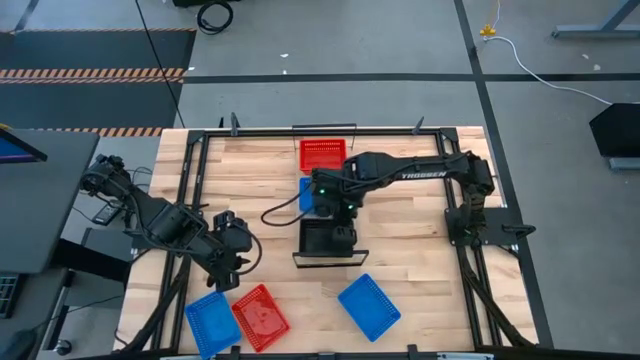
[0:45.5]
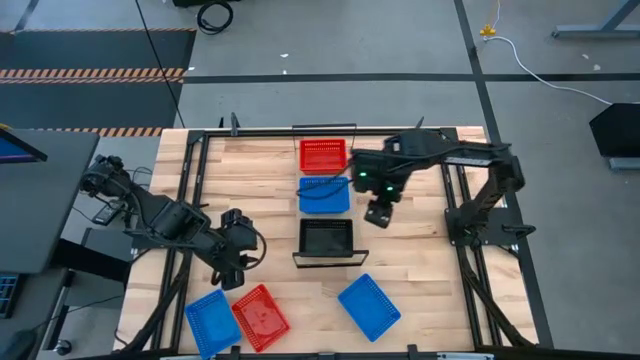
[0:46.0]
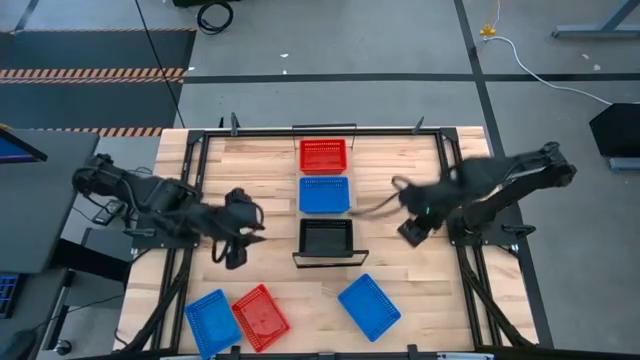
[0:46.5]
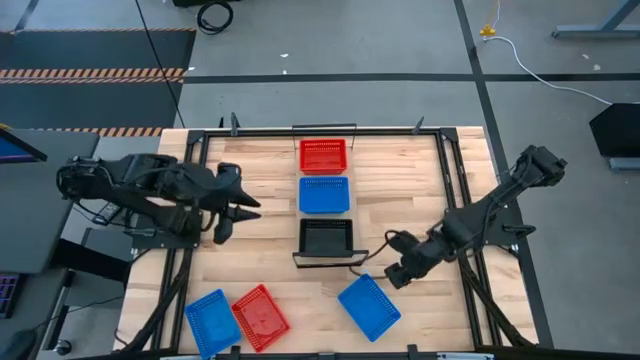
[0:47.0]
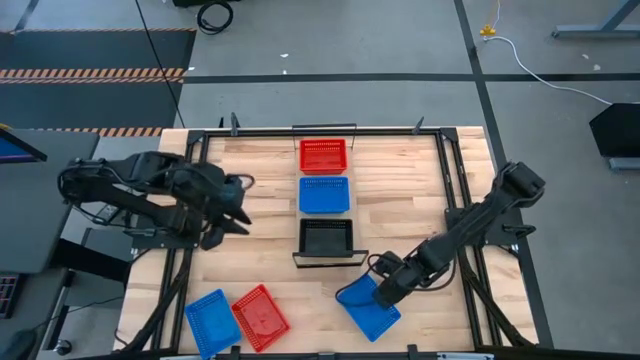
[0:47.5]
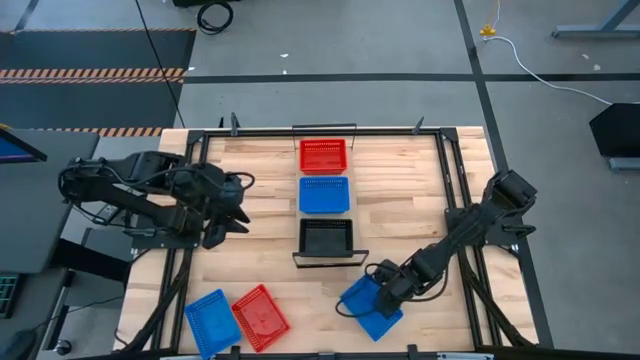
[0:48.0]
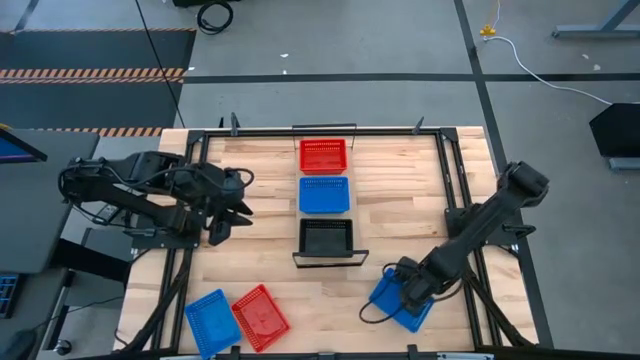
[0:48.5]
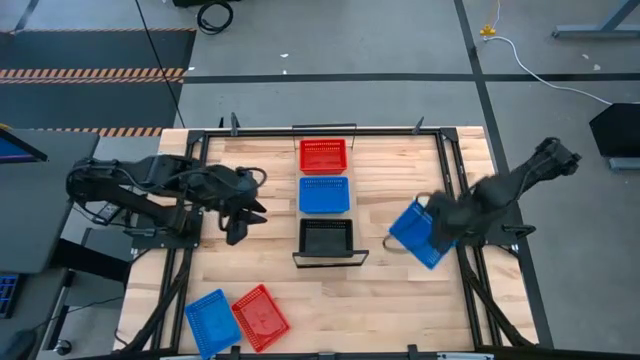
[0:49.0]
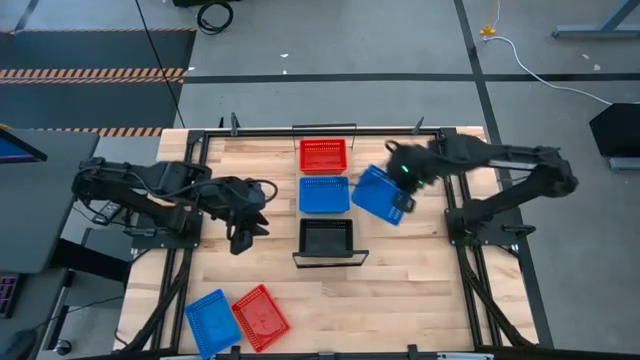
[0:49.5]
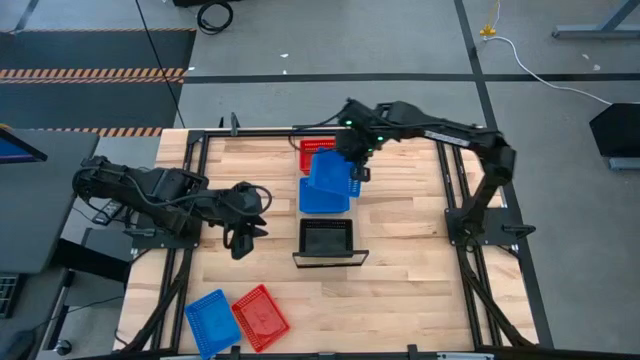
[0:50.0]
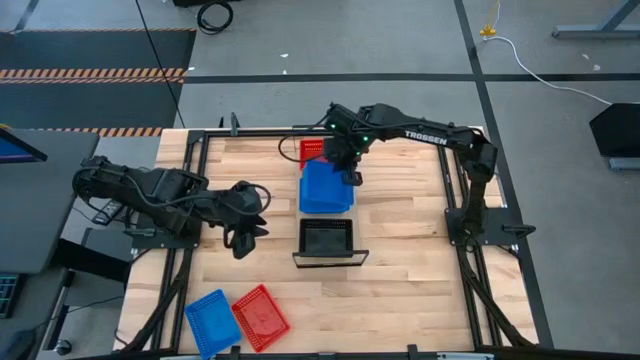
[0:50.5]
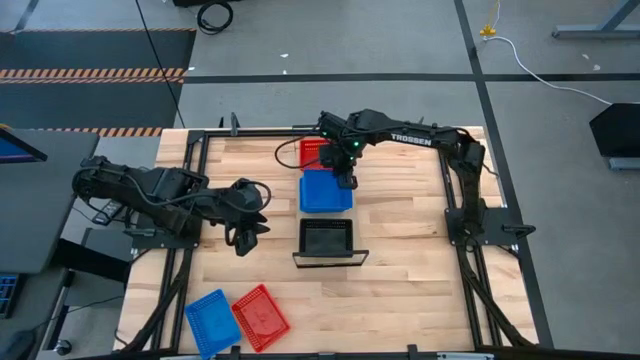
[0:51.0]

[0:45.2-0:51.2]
Task: Stack baskets on shelf by color
Stack the right blue bin on the blue bin on the shelf

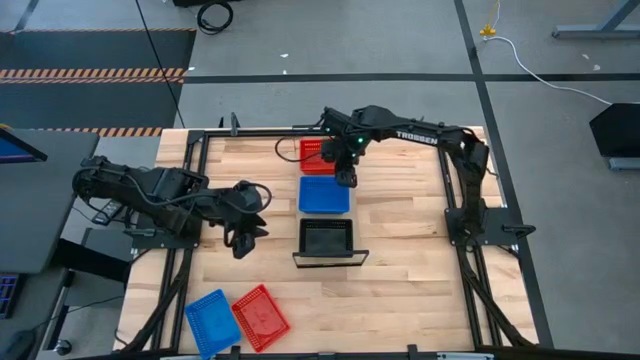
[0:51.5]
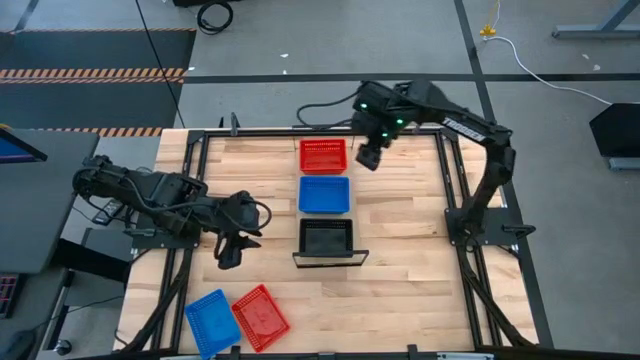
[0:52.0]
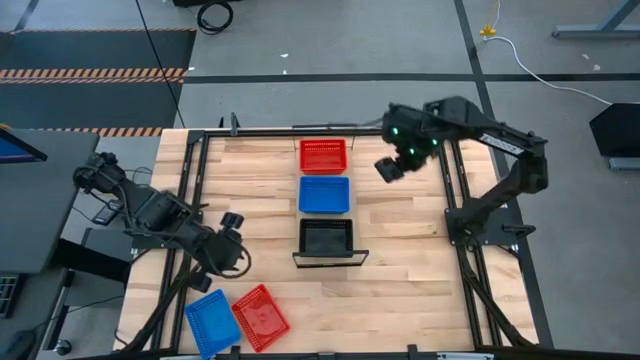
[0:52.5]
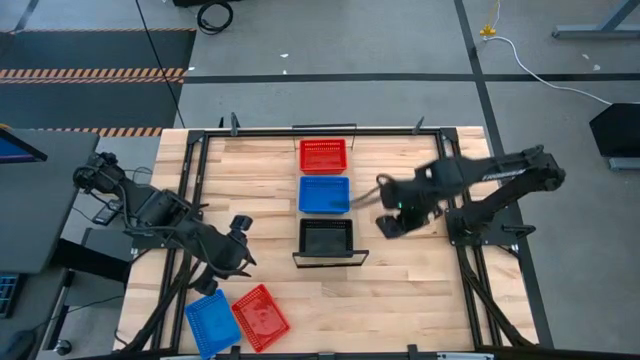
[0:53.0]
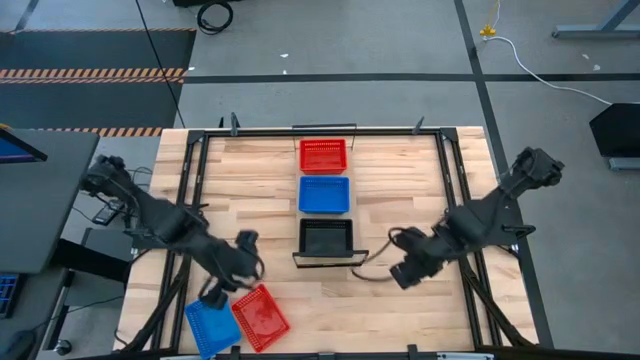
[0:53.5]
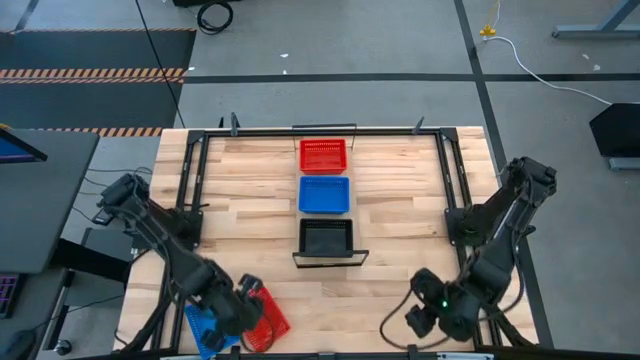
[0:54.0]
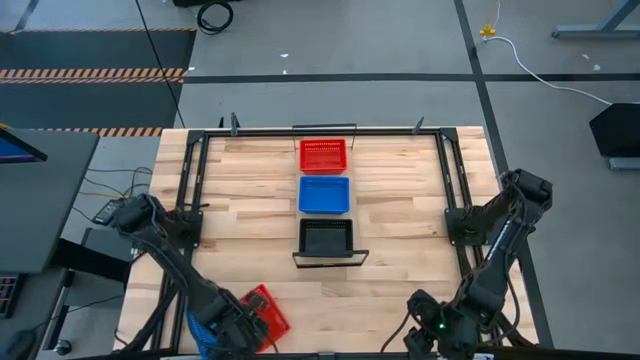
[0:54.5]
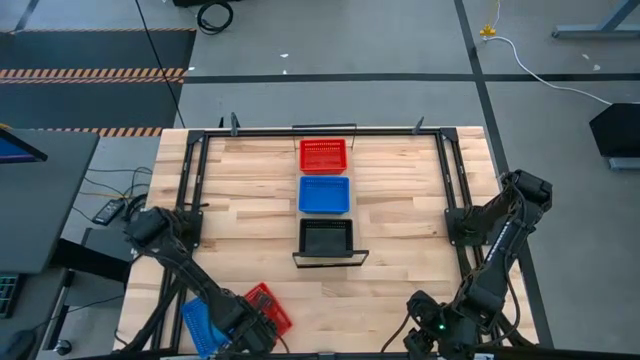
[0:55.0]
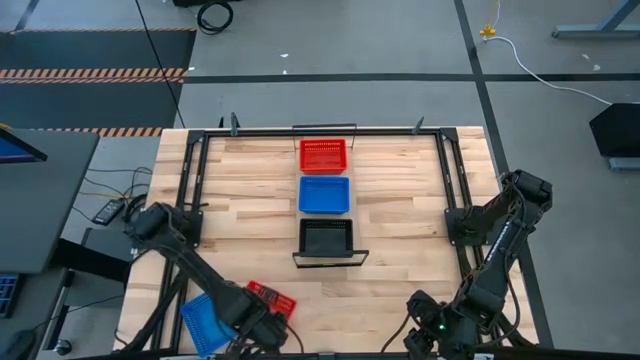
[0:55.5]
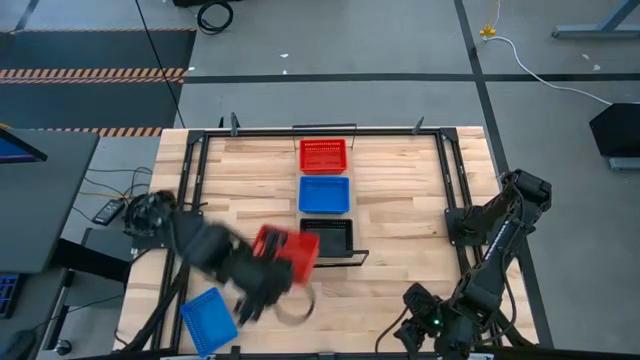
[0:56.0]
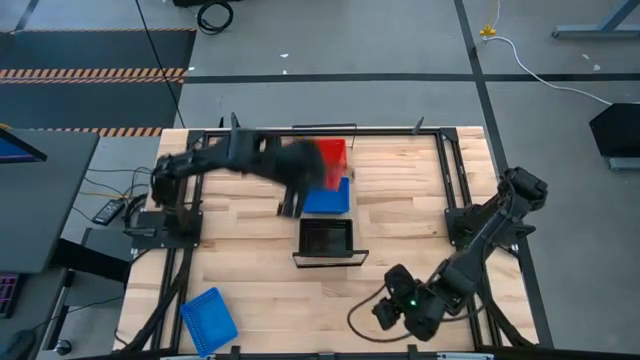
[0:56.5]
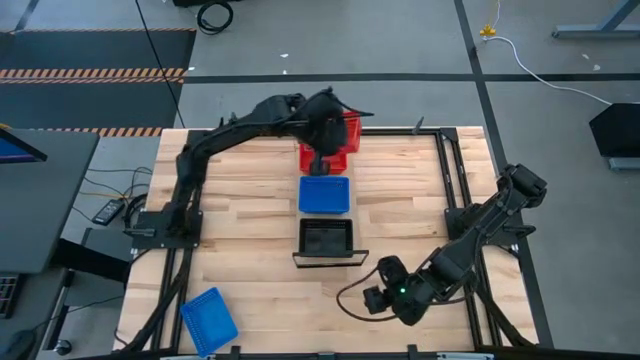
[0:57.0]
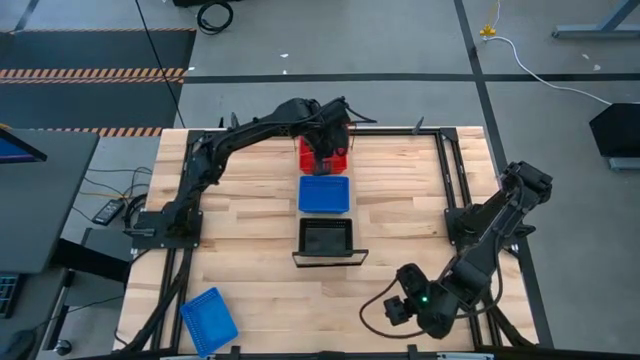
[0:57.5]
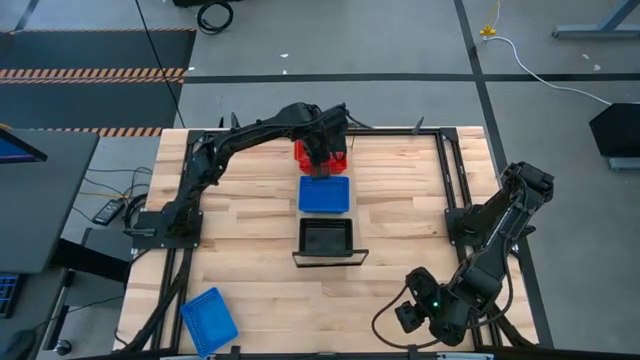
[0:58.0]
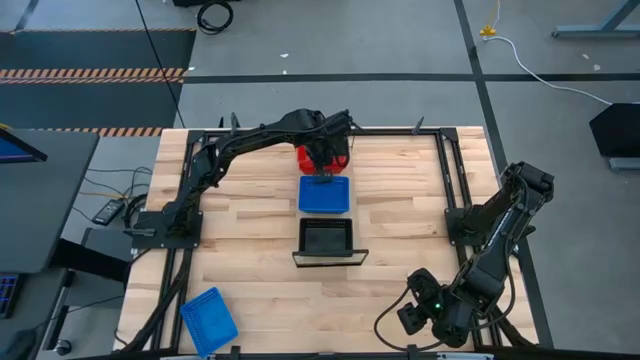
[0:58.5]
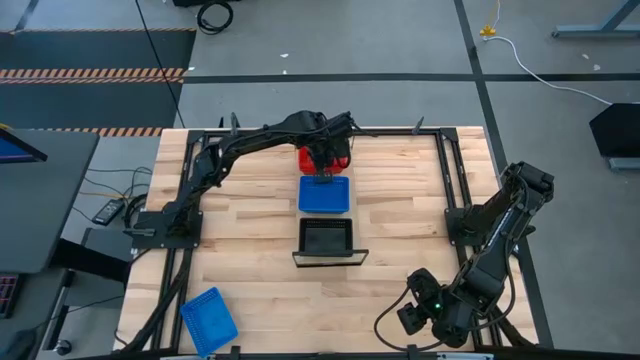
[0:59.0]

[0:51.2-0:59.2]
Stack the red bin on the red bins on the shelf

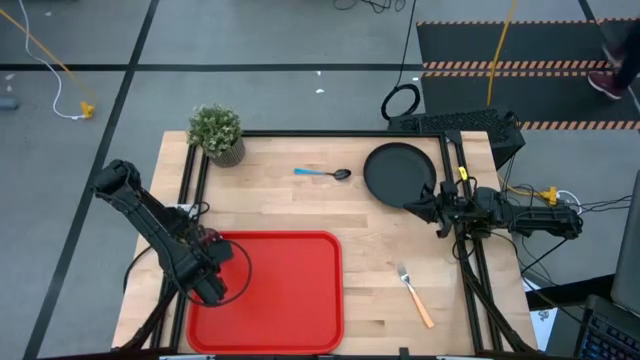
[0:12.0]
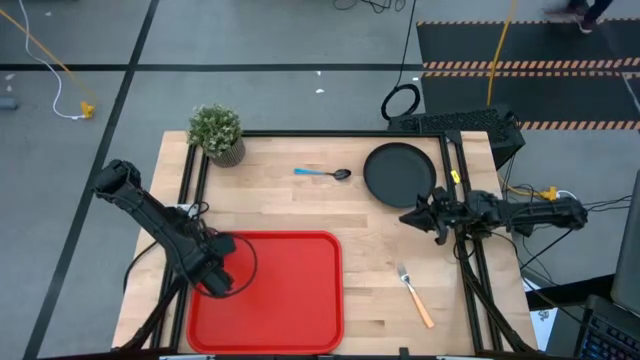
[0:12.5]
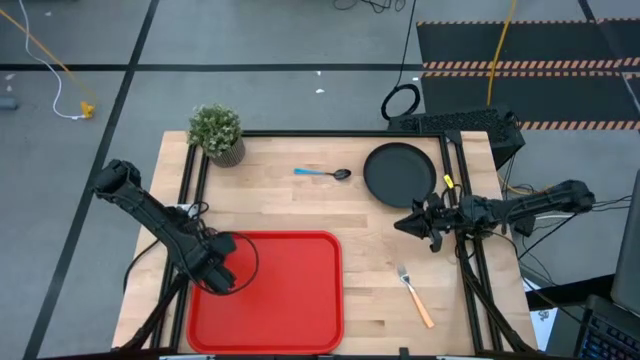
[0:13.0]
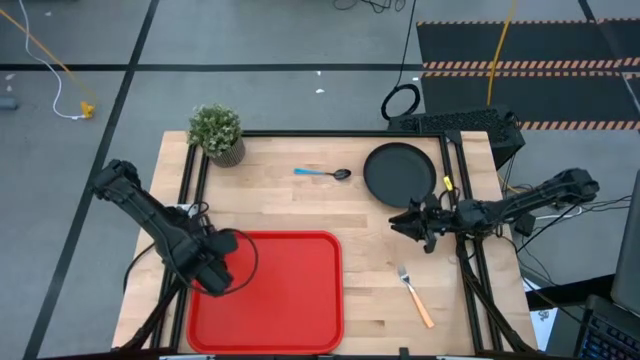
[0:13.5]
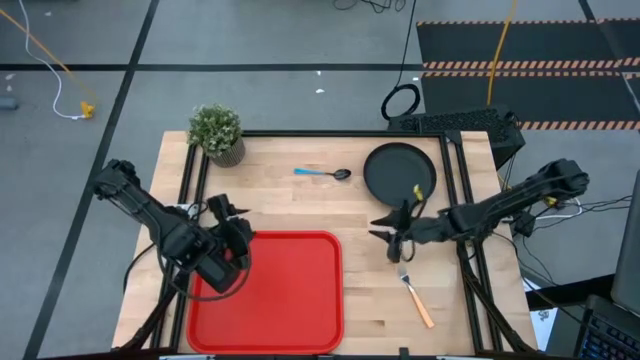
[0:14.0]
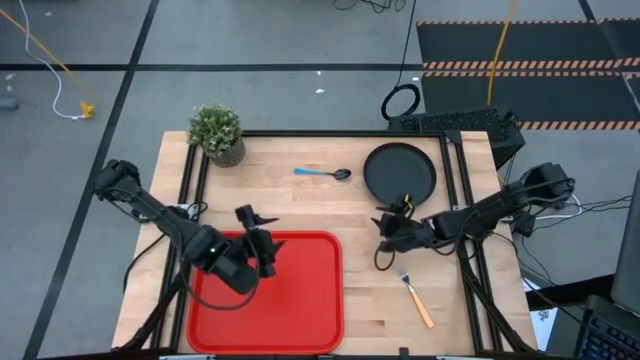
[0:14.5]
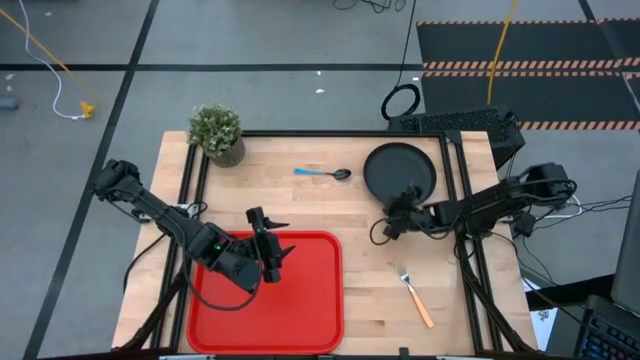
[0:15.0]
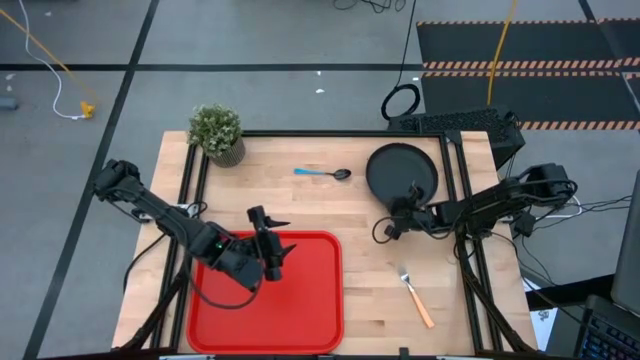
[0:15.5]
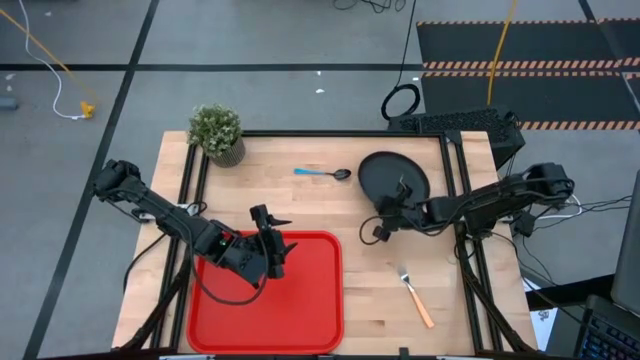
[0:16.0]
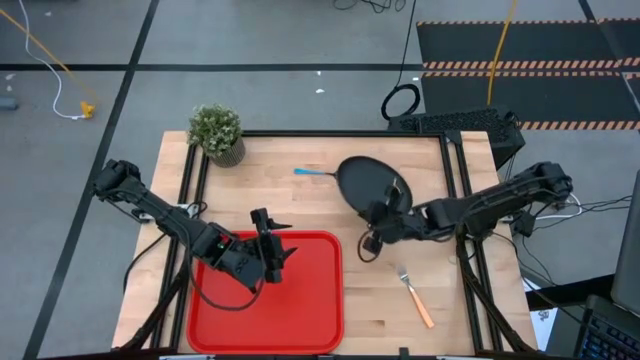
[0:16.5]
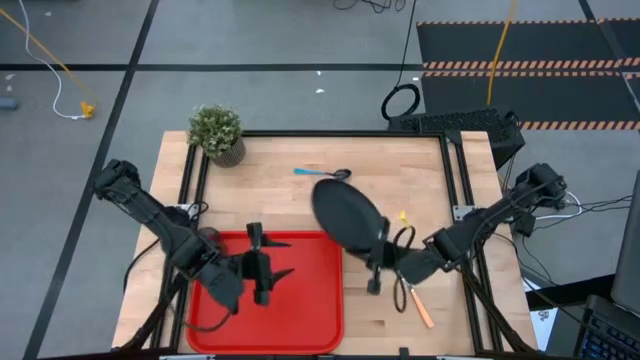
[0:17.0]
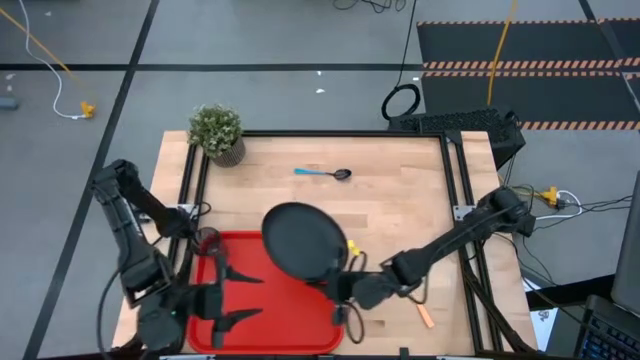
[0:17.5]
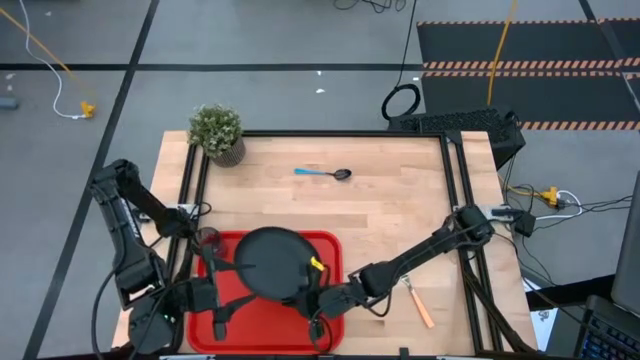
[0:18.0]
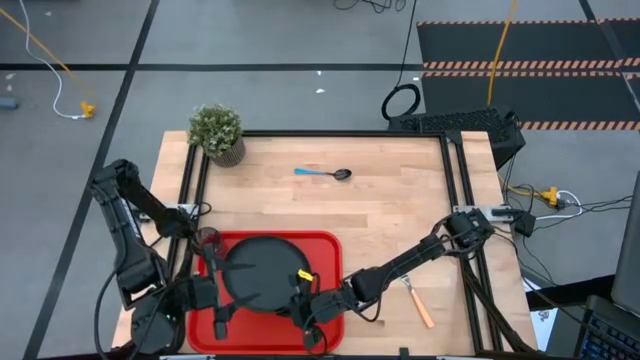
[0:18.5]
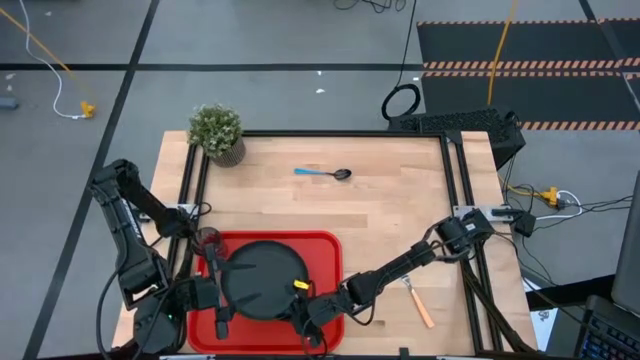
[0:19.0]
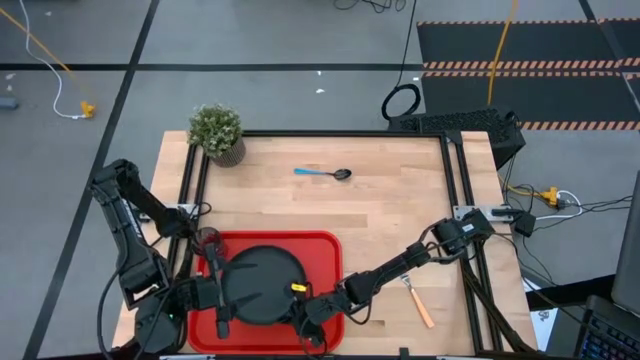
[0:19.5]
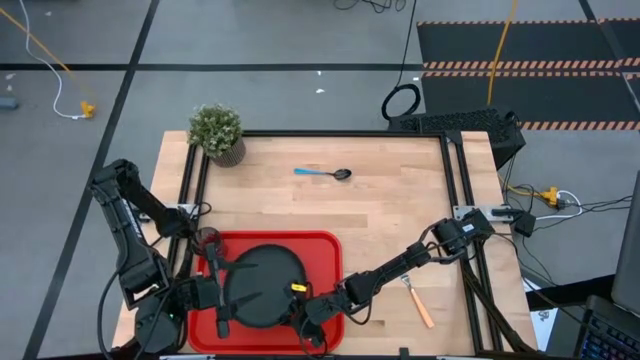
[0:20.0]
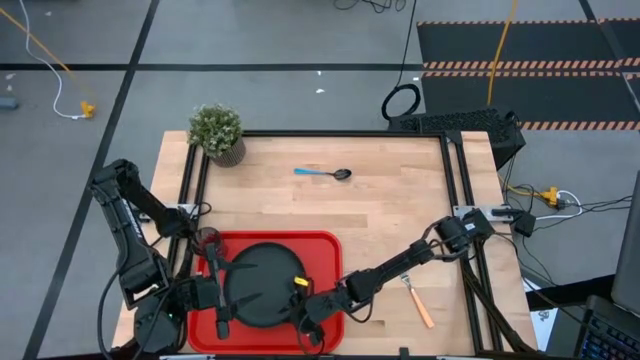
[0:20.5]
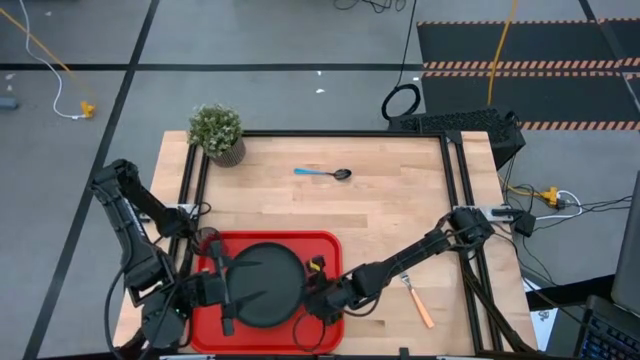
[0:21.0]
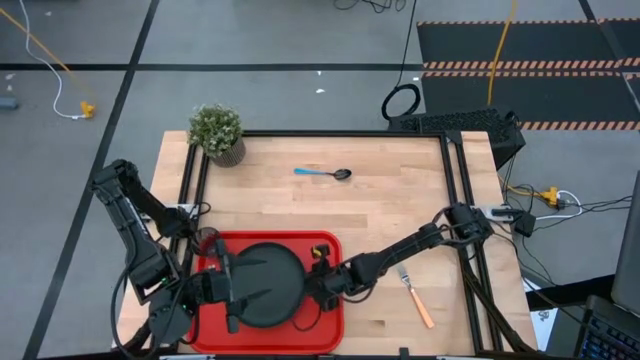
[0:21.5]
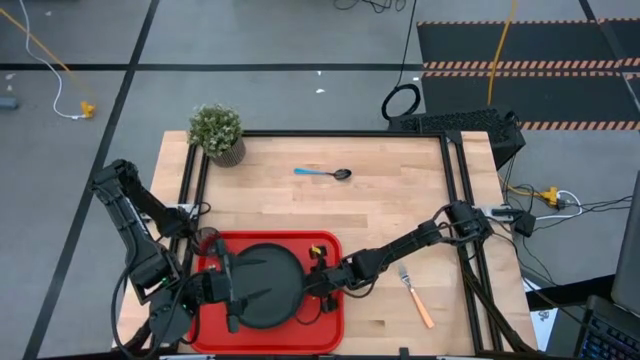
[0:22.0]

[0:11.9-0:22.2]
Task: Pick and place plate/cup/fork/spoon on tray
Put the black plate on the red serving tray
